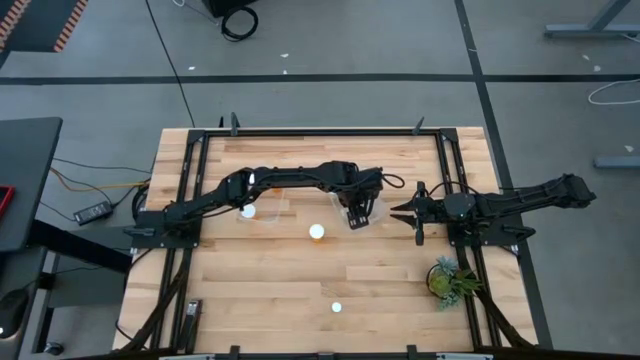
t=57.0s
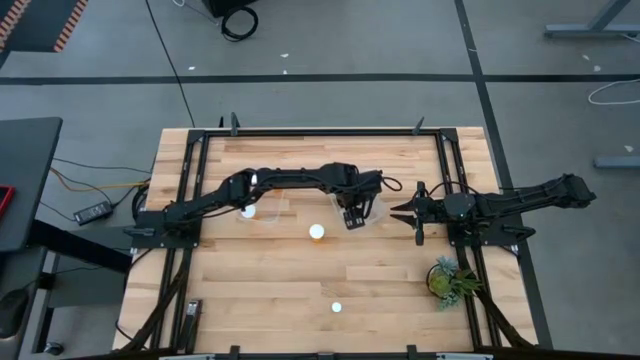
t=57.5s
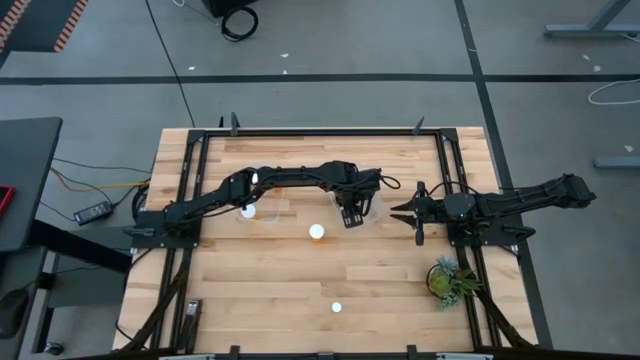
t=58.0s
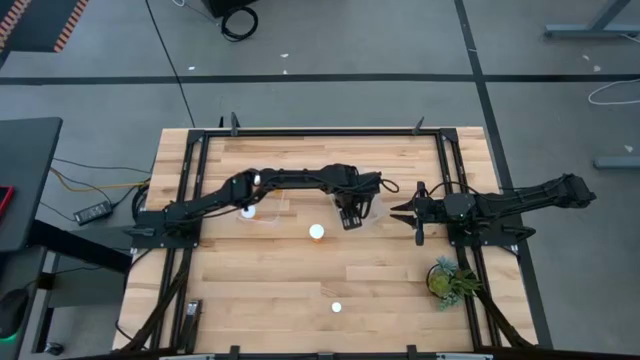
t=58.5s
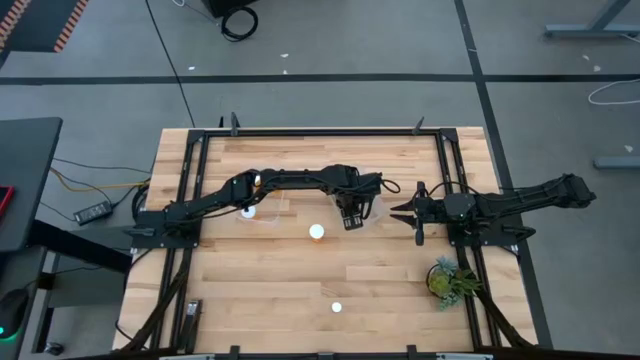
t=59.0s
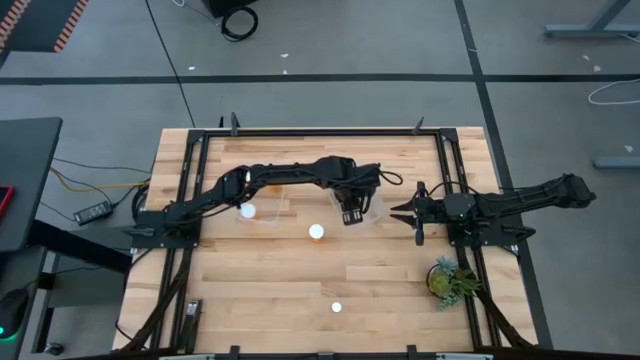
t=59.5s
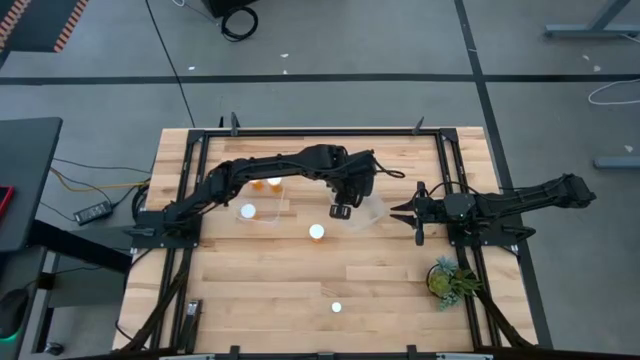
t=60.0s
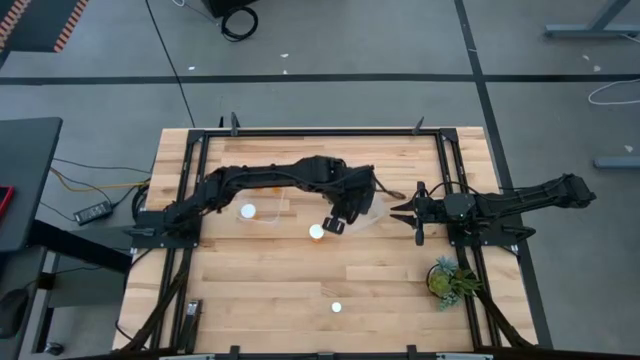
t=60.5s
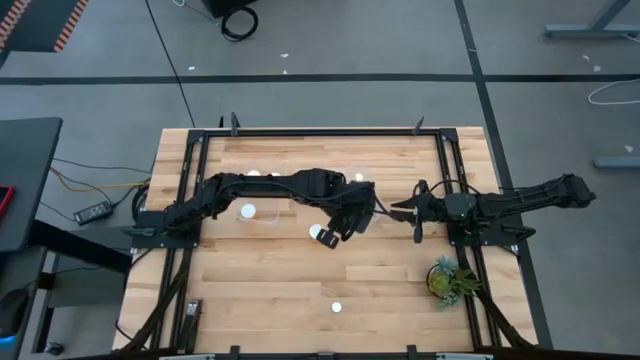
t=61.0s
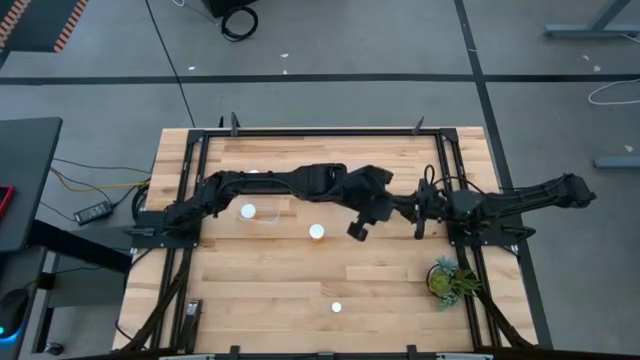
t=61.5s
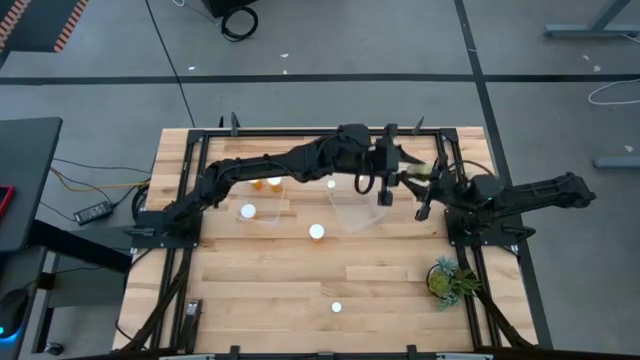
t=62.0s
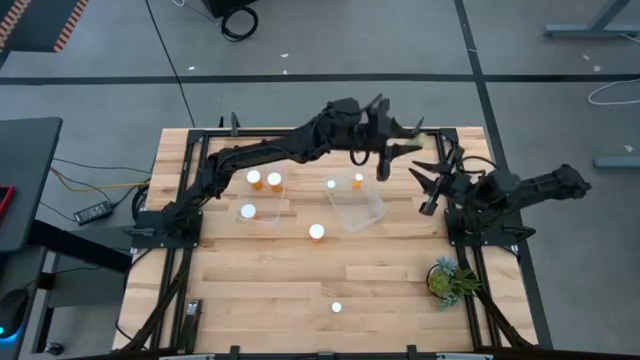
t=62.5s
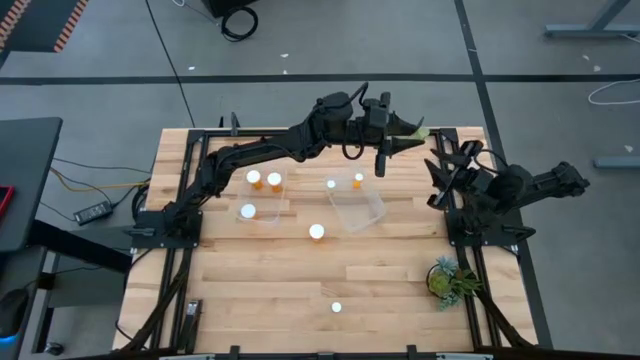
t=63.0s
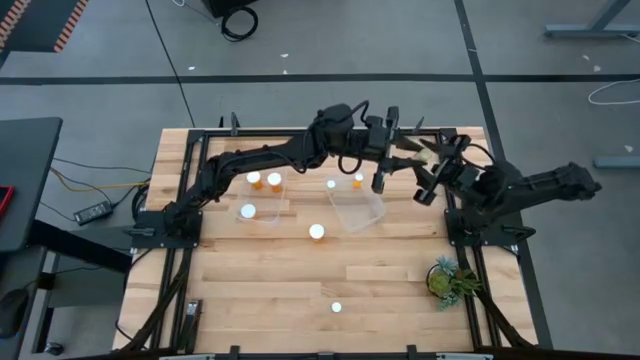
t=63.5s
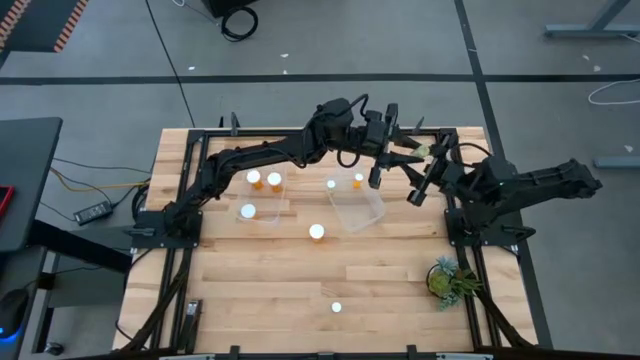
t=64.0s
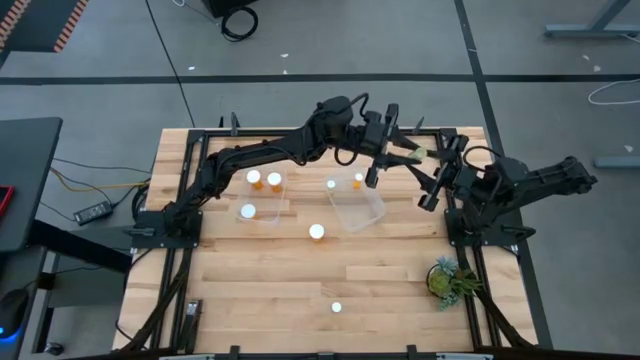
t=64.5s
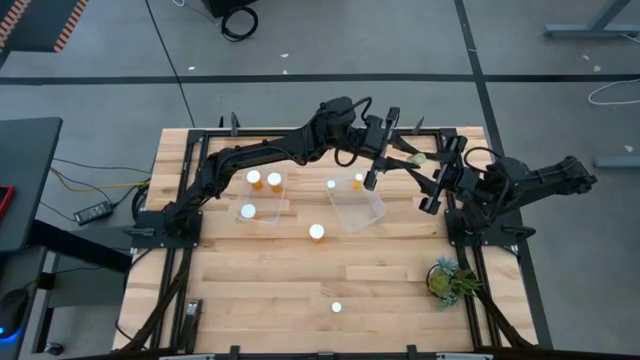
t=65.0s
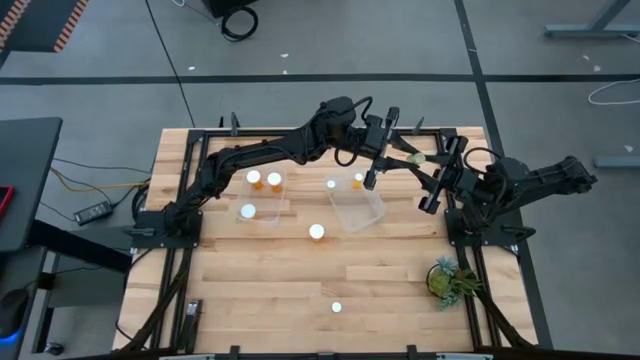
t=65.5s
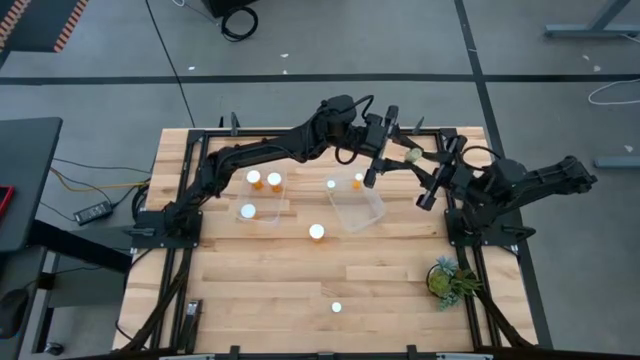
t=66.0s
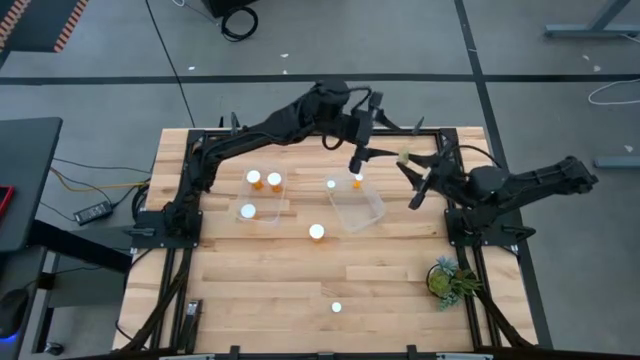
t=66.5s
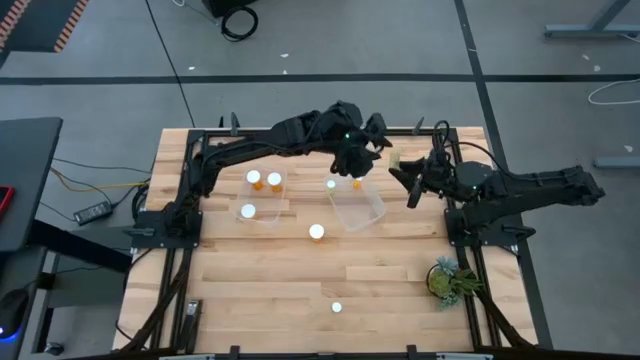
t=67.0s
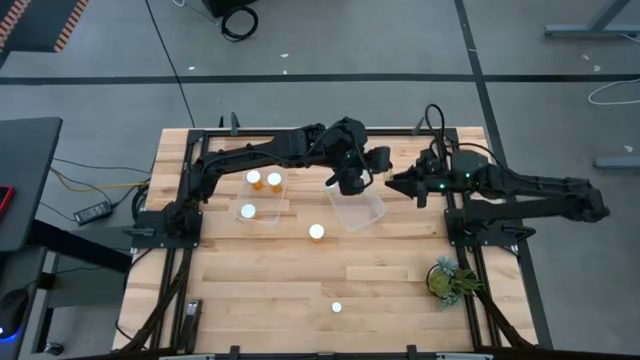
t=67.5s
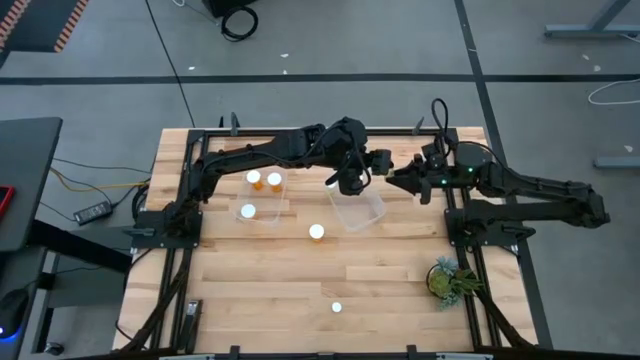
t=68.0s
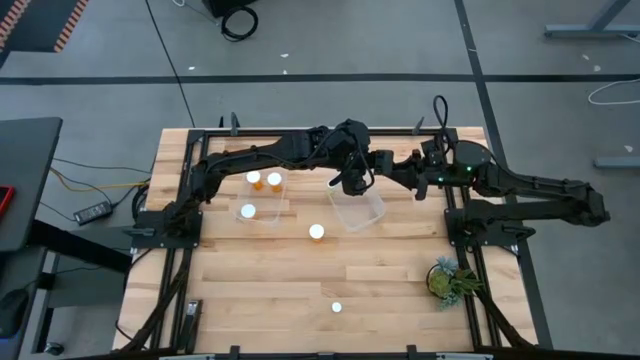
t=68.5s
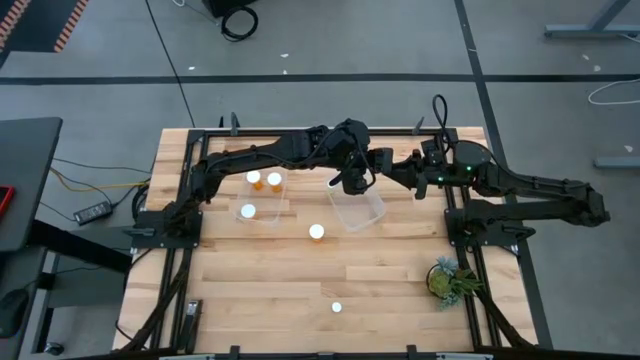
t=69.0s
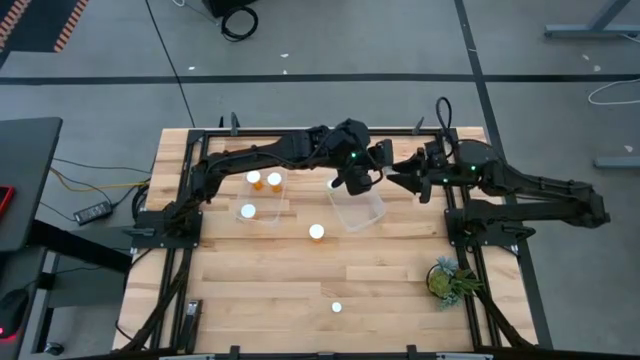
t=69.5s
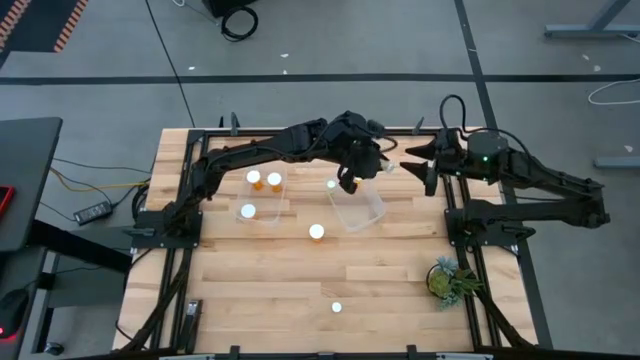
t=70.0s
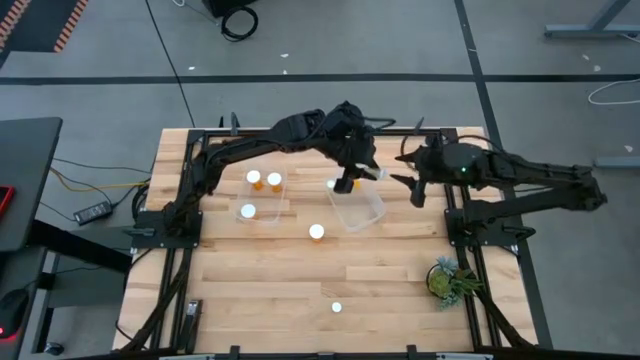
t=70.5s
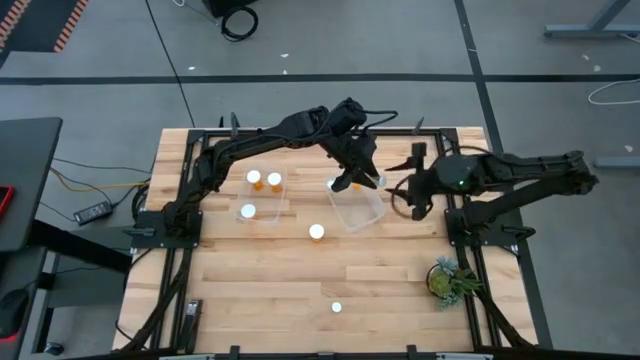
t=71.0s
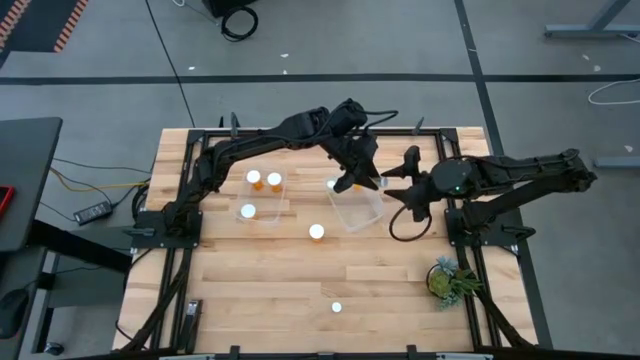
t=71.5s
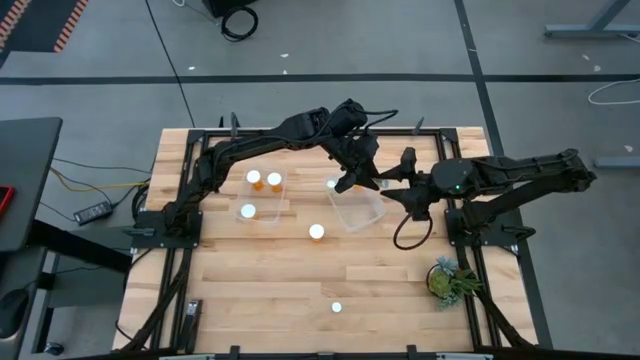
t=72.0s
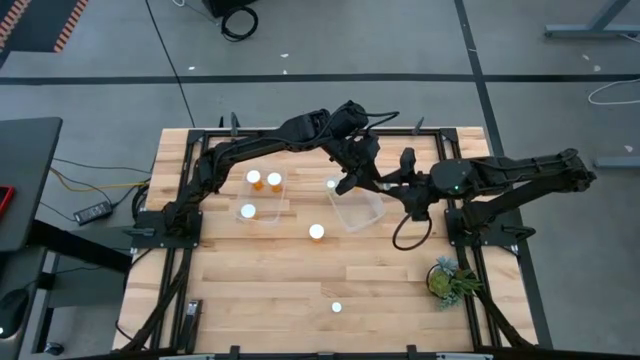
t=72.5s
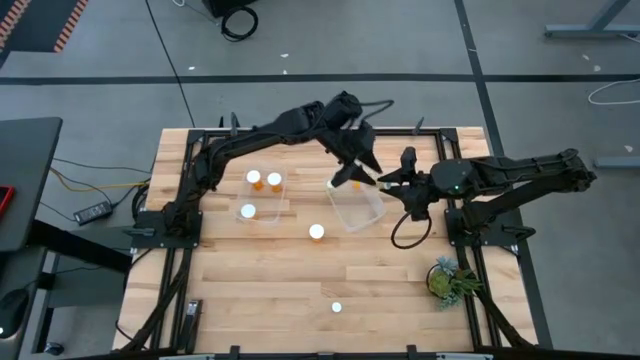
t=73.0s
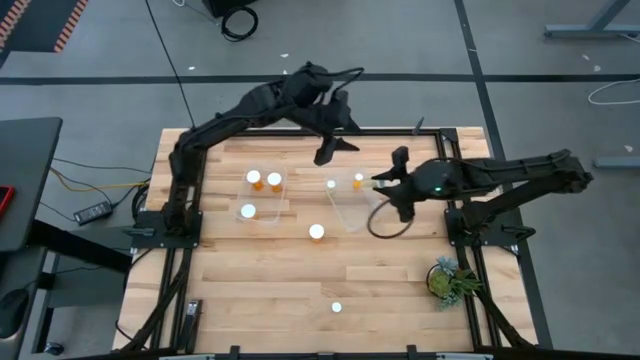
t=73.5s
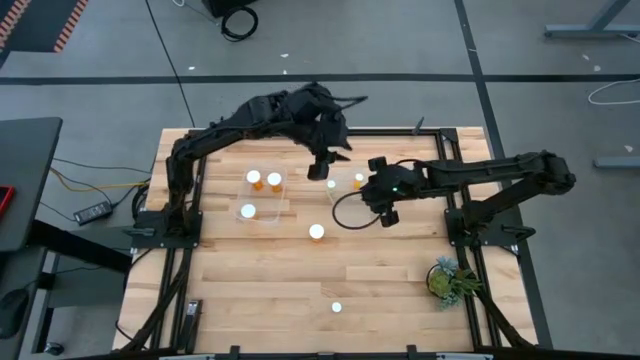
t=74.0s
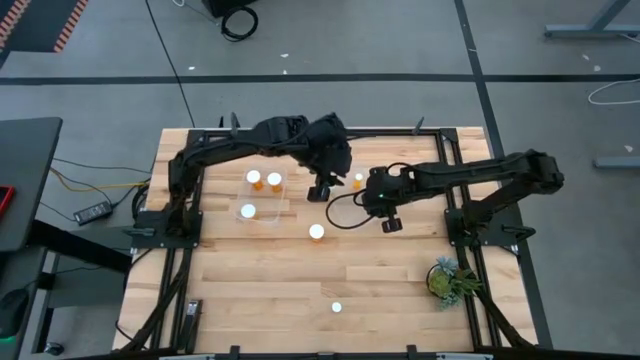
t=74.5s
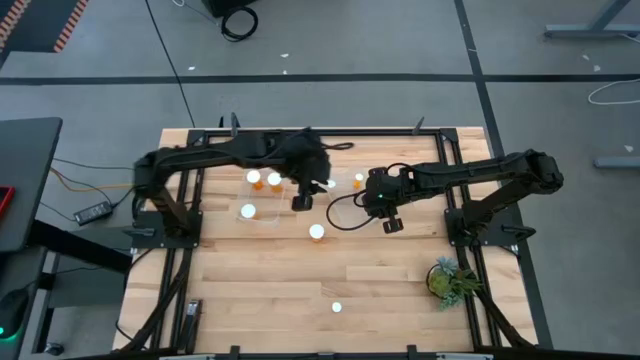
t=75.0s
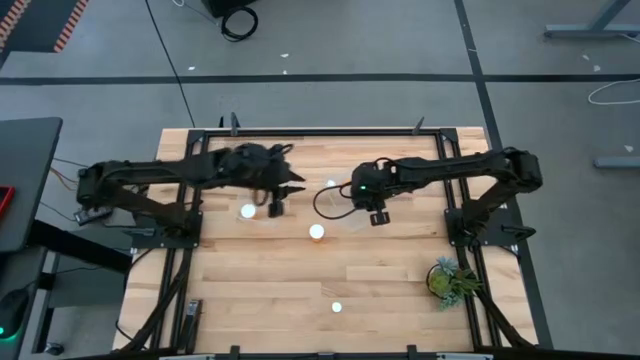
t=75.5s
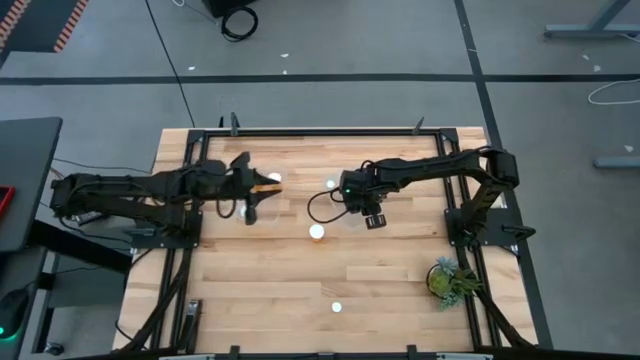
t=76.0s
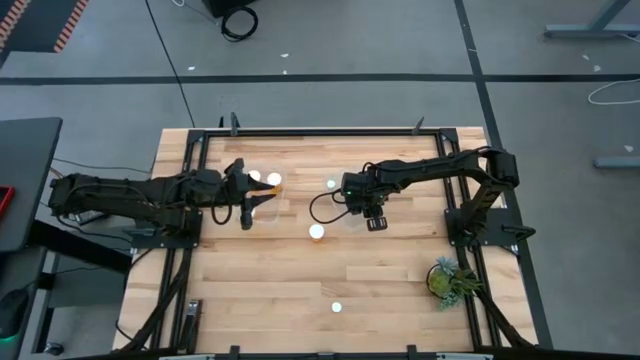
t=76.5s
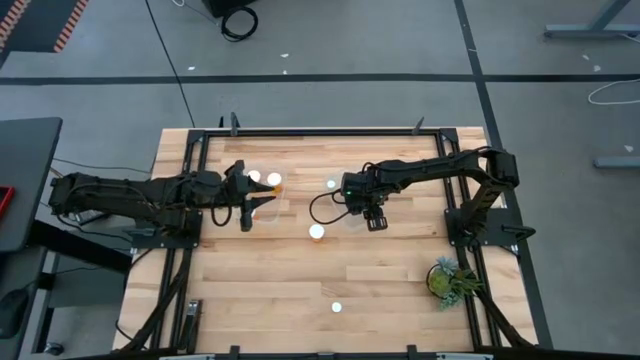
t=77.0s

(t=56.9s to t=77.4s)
Task: Pick and place medicine bottles into bin by pill shape (circle, oval)
Put the small yellow pill bottle into the right transparent bin
